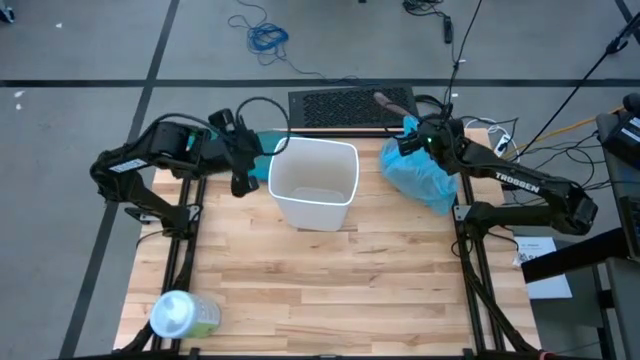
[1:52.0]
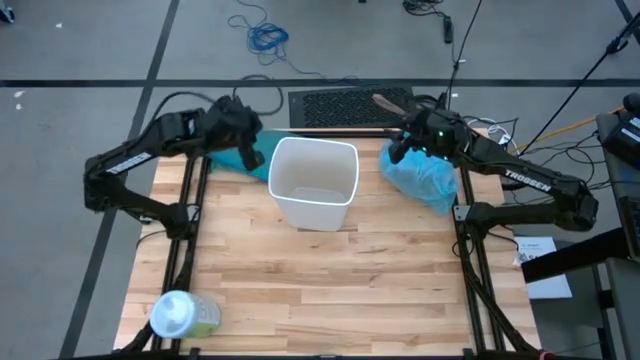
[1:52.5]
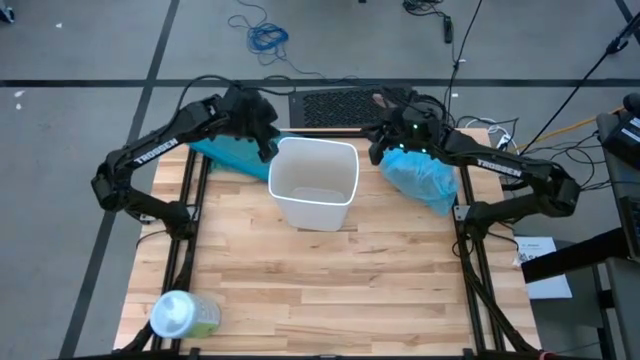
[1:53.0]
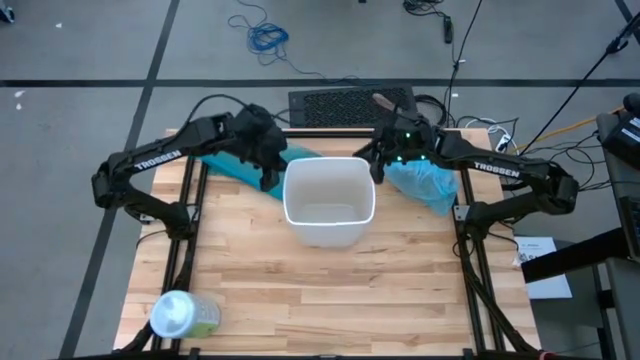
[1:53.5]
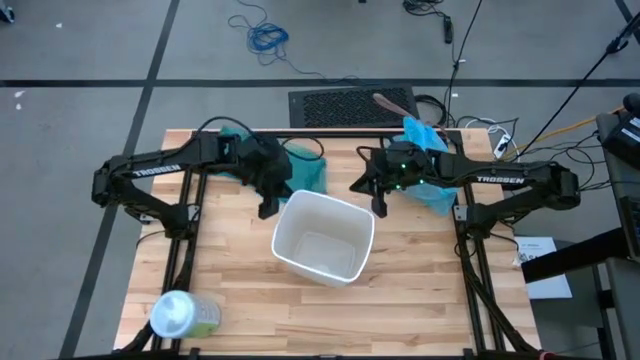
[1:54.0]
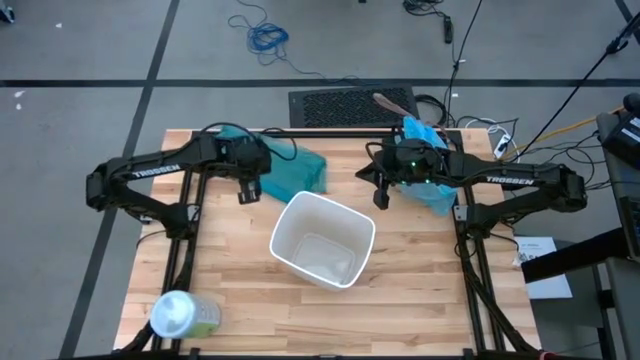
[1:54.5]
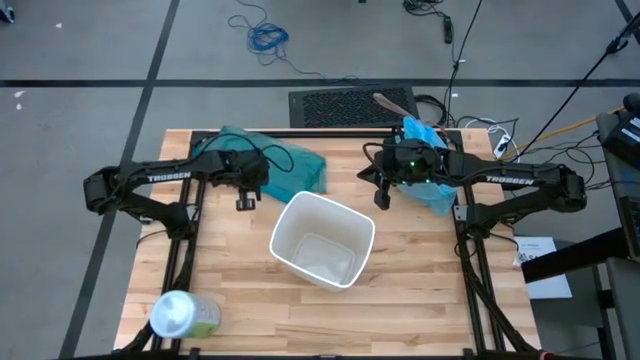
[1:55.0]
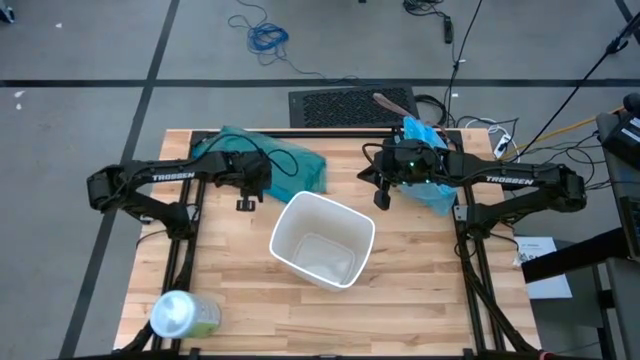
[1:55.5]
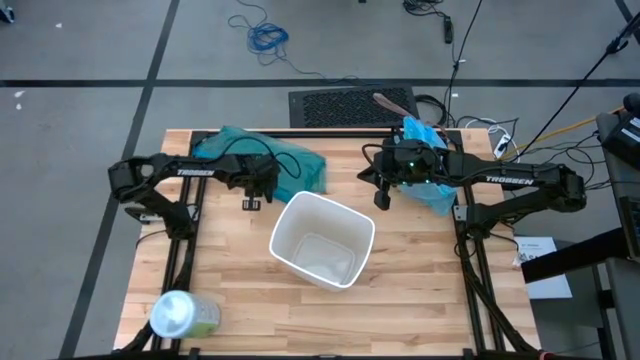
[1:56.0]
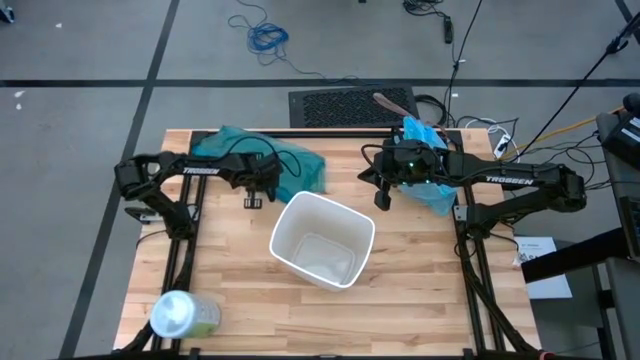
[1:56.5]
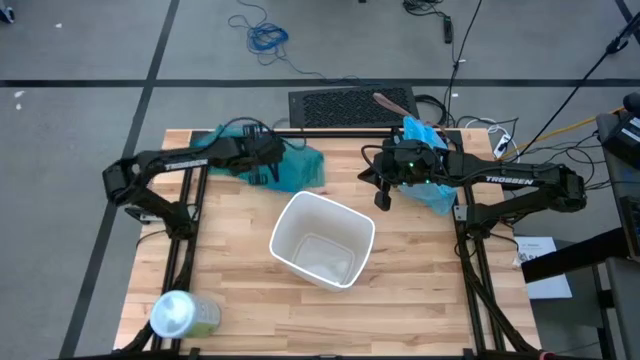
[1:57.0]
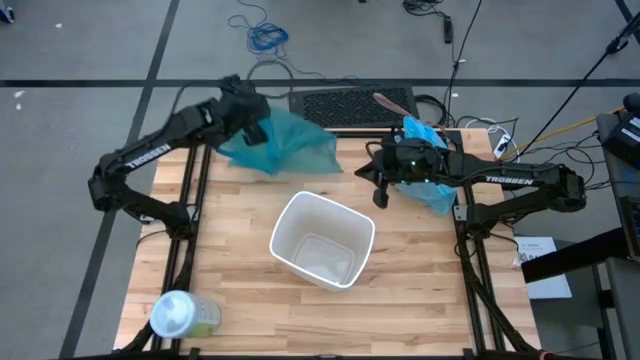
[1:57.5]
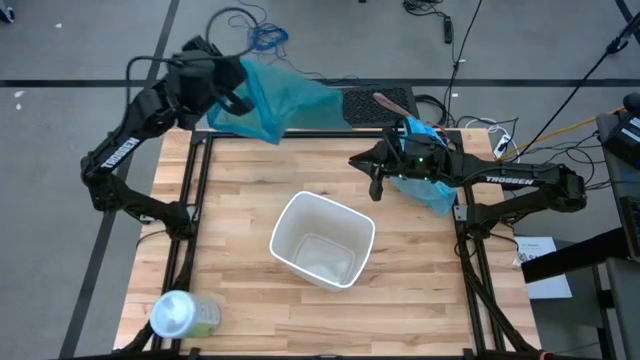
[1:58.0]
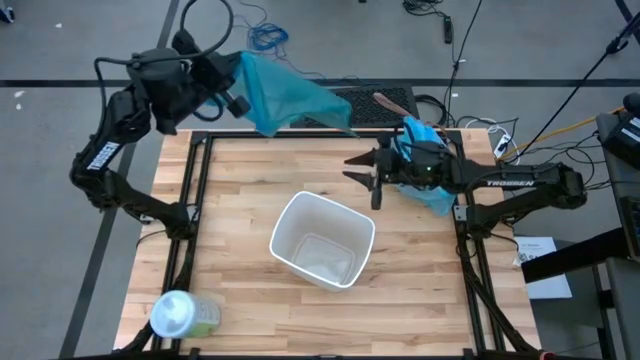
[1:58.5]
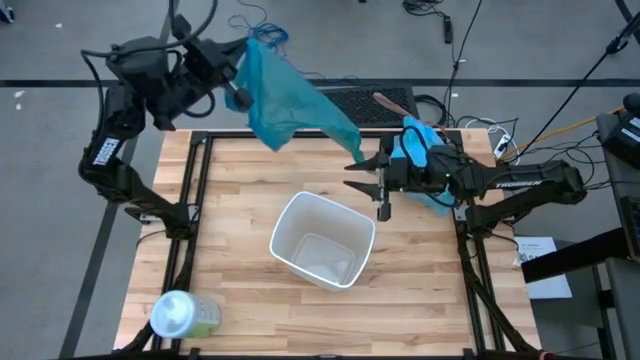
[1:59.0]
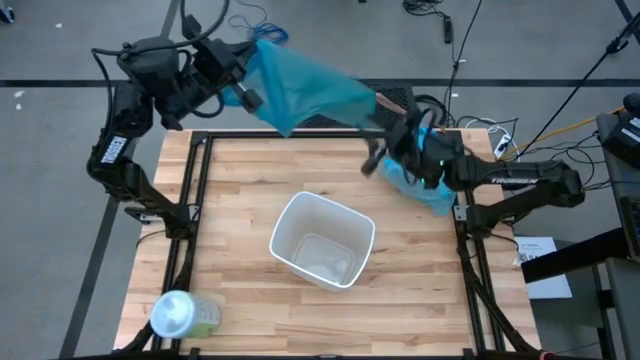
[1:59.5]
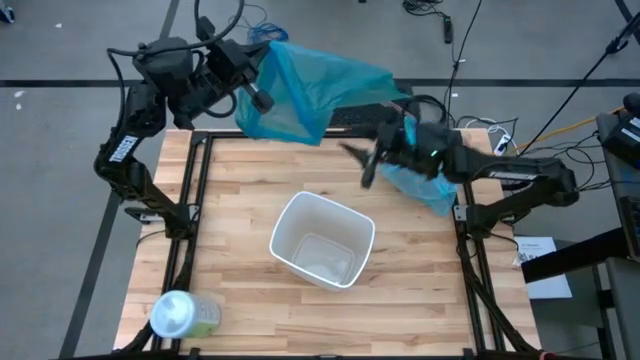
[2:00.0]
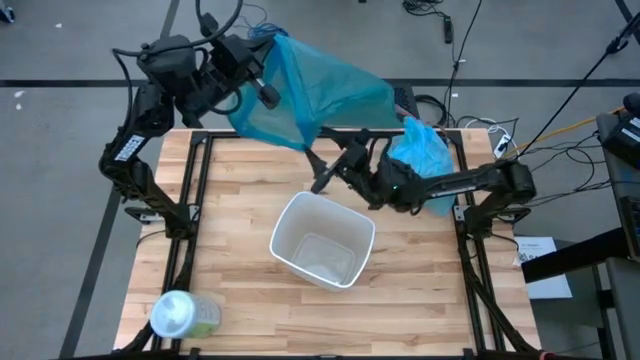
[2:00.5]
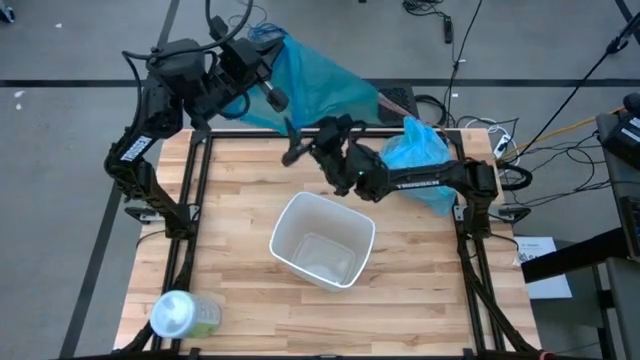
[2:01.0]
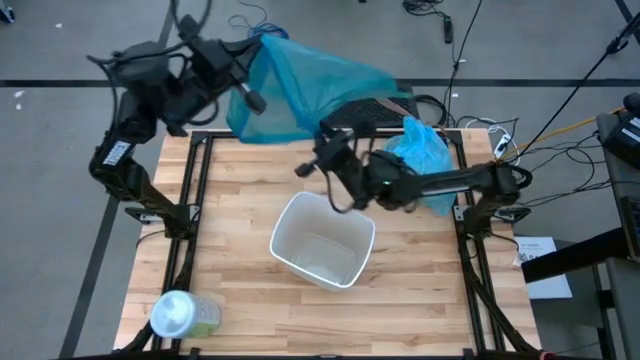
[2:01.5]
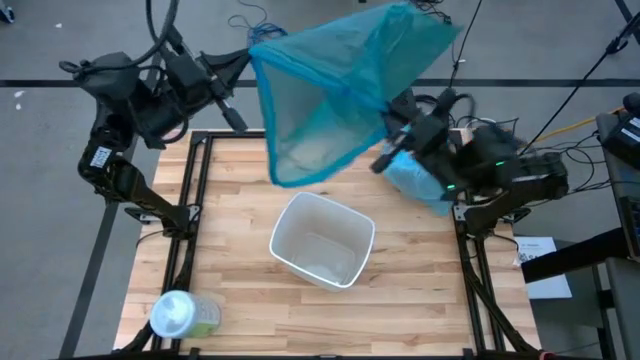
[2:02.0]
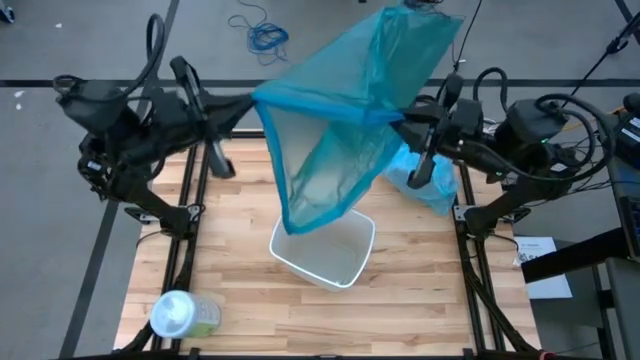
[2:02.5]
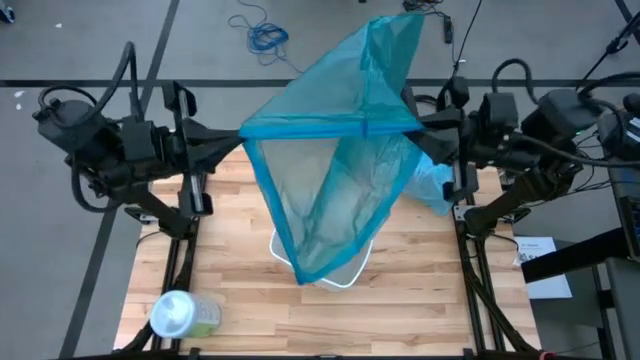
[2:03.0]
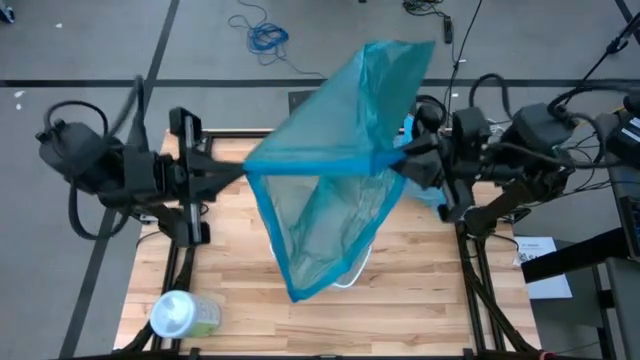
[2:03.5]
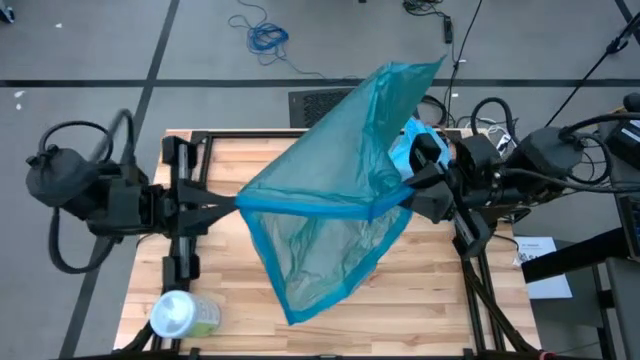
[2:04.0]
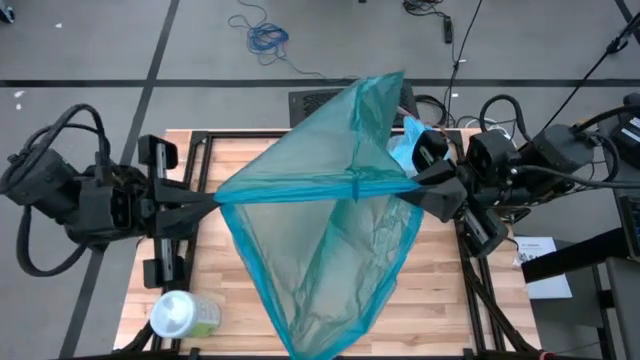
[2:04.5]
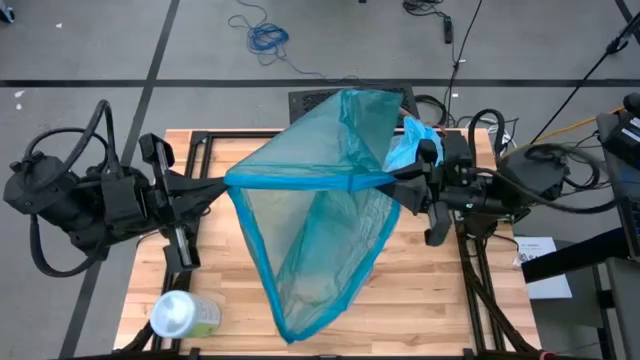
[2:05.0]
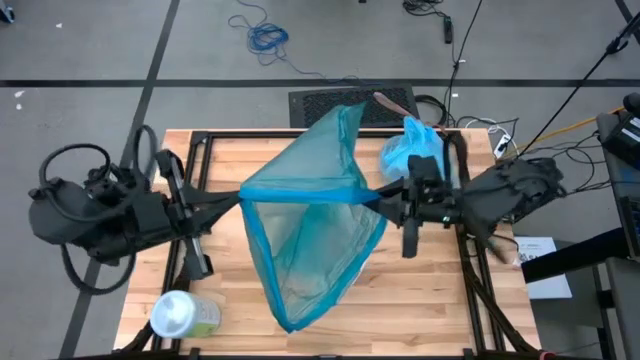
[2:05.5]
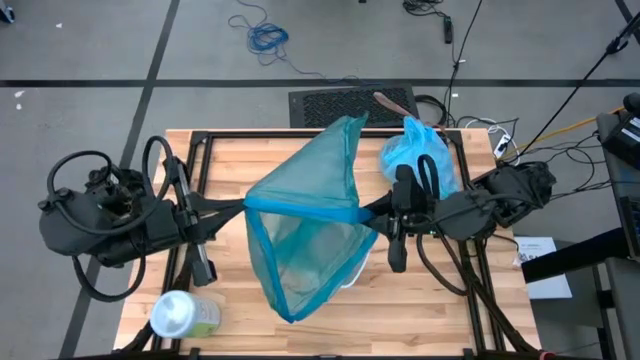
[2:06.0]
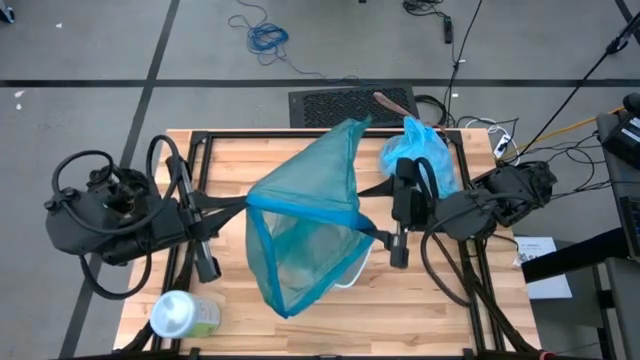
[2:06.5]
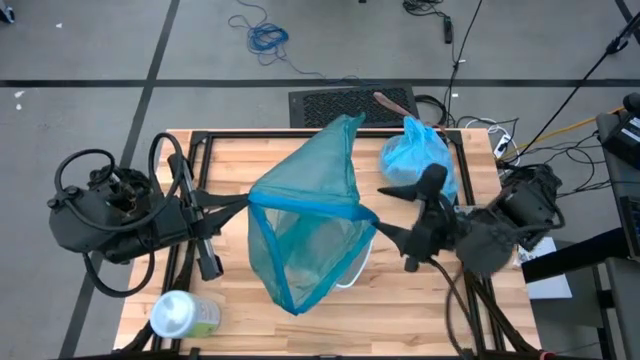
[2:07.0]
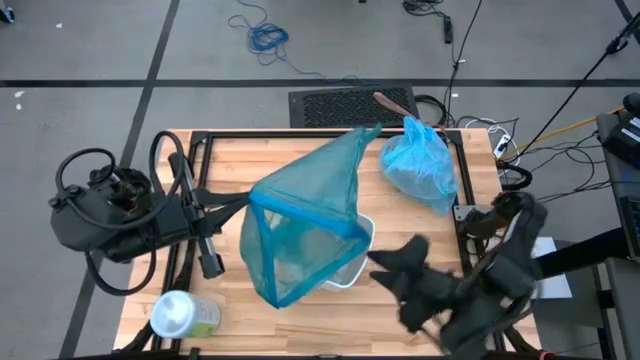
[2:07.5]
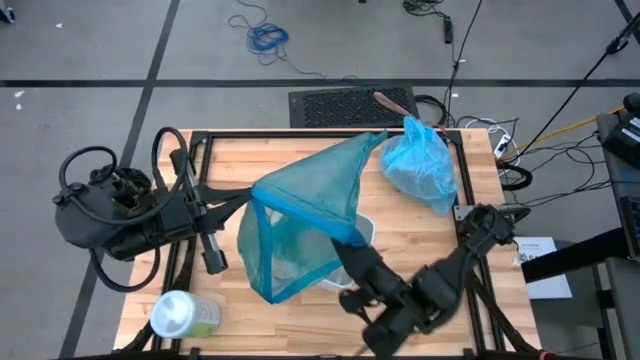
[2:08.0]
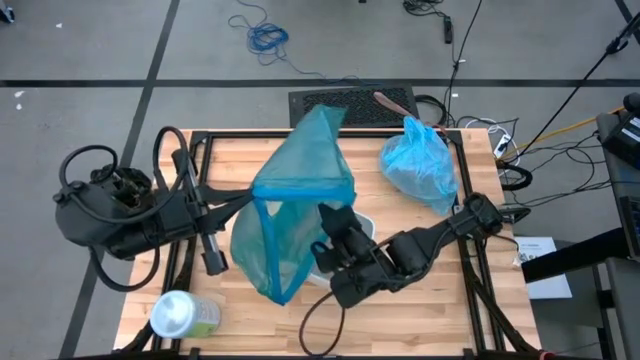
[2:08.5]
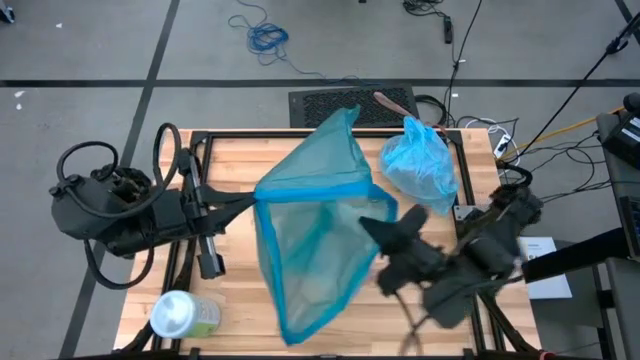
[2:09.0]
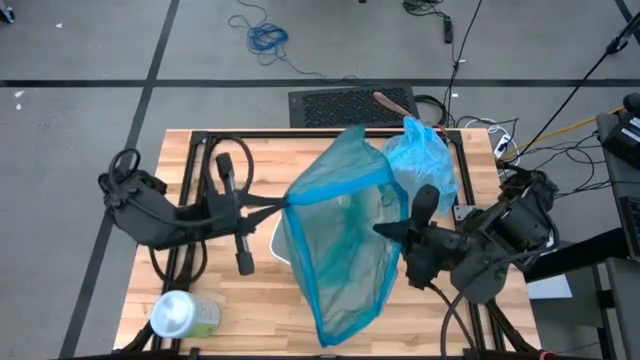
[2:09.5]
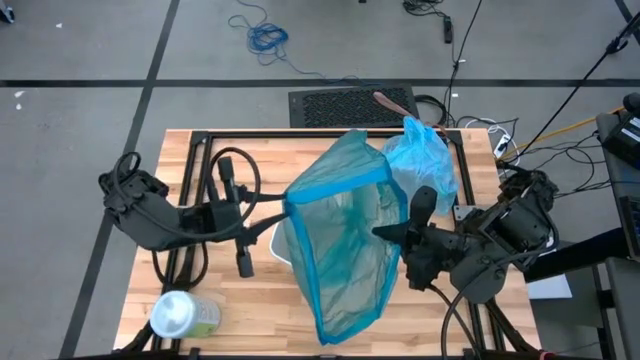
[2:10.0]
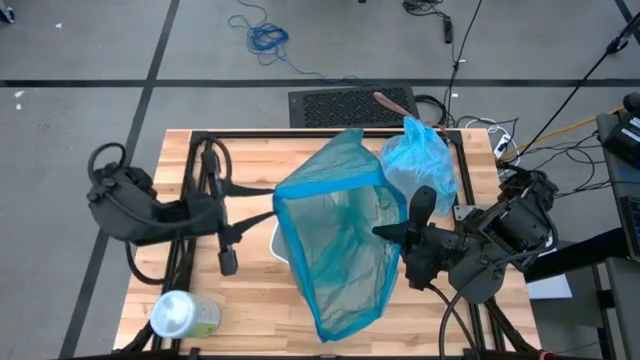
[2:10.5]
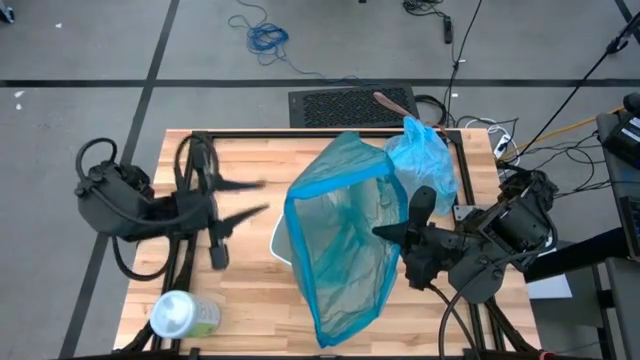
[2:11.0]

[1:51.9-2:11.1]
Task: place trash/remove bag and relplace
Insert the blue trash bag into the trash bin

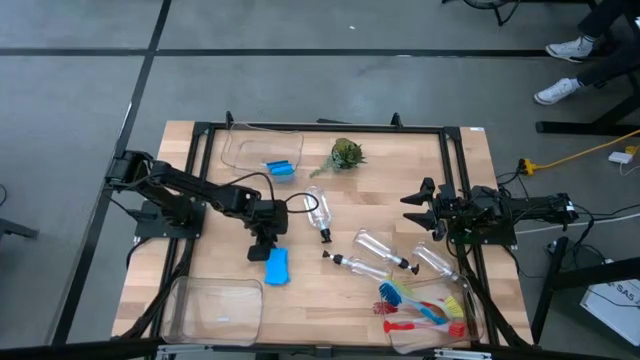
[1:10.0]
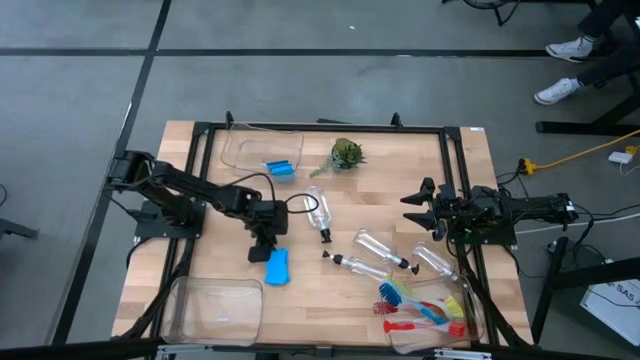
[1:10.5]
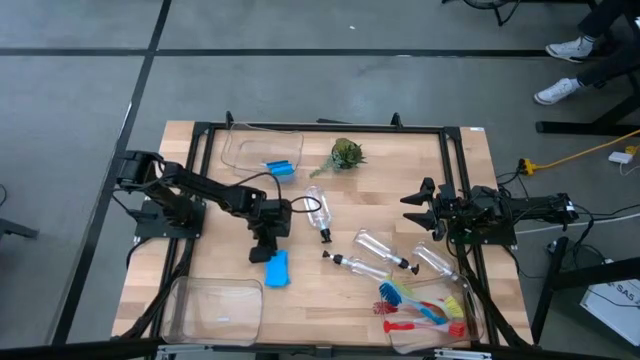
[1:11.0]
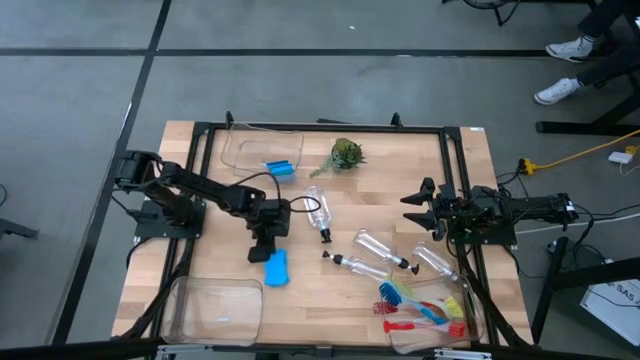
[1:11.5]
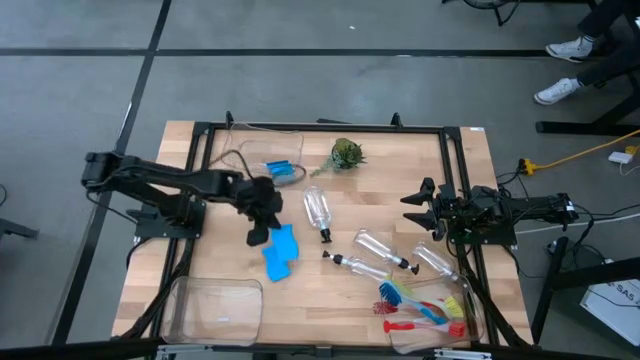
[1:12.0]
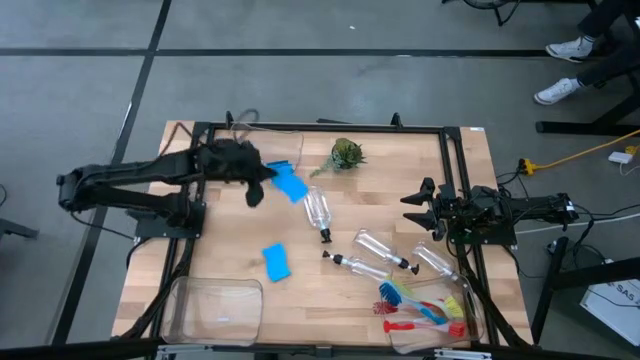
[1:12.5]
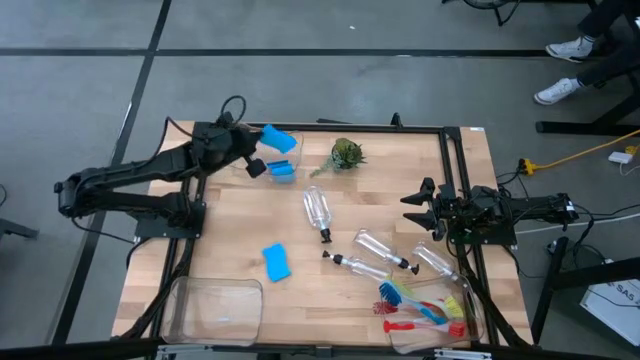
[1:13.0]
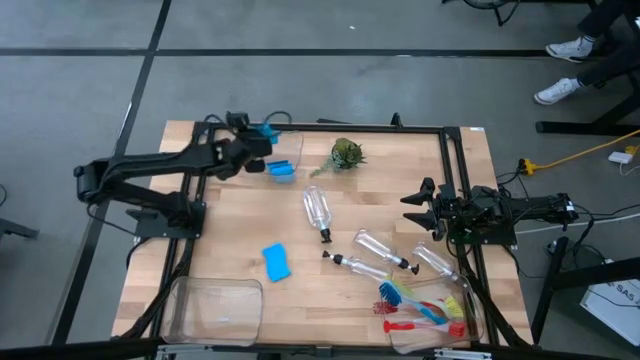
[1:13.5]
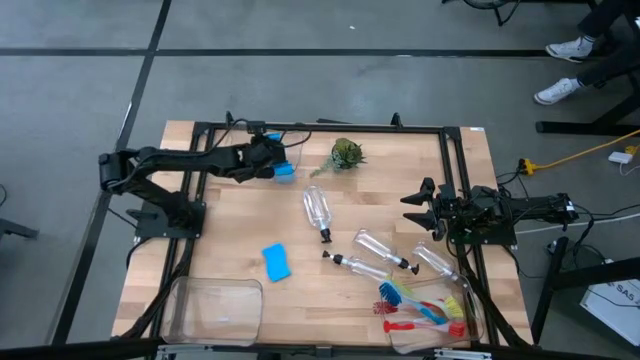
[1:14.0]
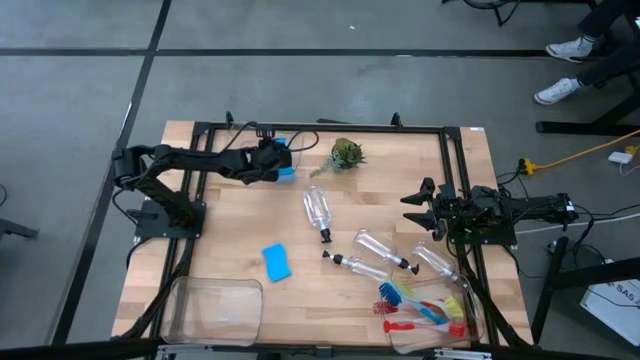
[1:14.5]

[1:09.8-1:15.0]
Task: Pick & Place Kitchen Sink Supplies
Put the blue sponge into the top transparent bin
